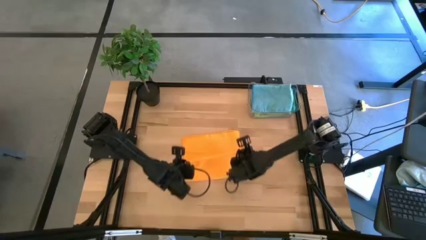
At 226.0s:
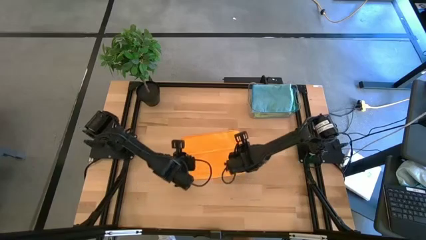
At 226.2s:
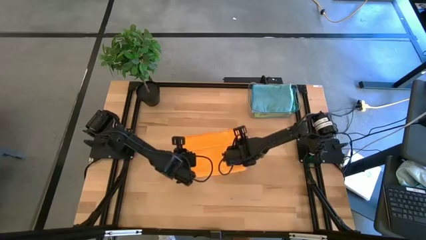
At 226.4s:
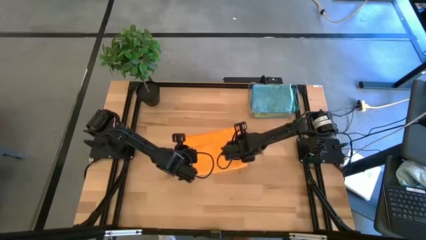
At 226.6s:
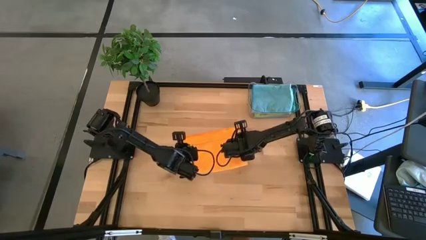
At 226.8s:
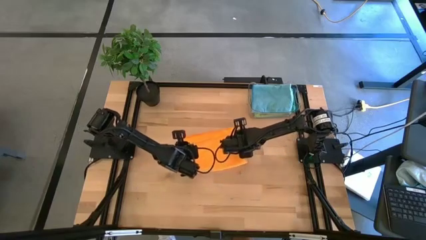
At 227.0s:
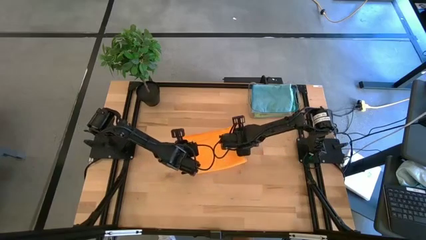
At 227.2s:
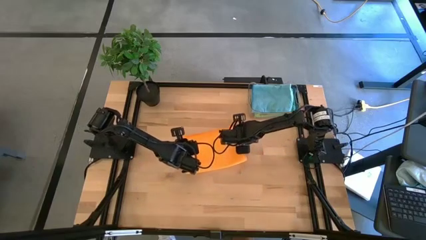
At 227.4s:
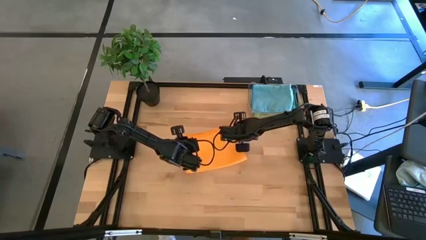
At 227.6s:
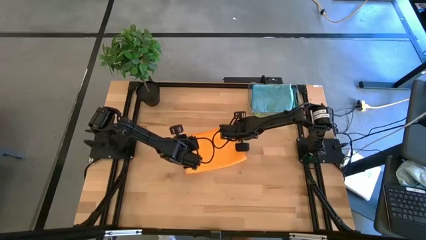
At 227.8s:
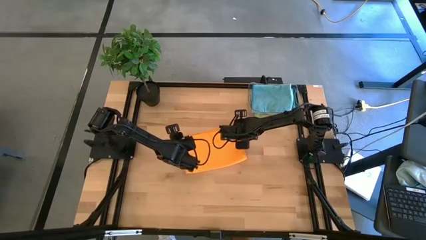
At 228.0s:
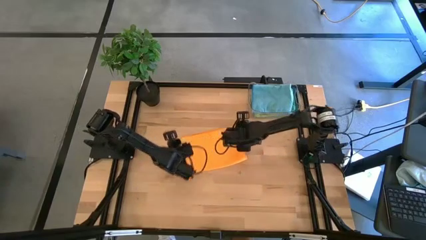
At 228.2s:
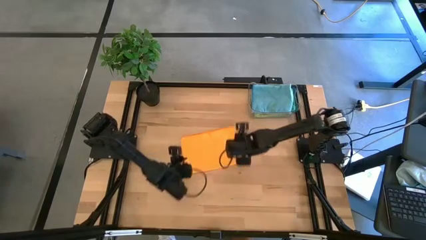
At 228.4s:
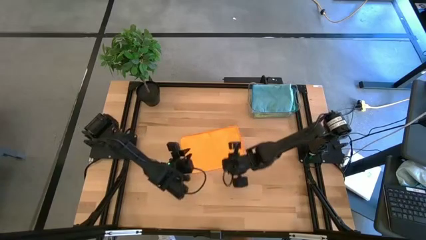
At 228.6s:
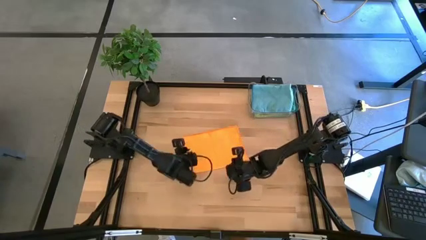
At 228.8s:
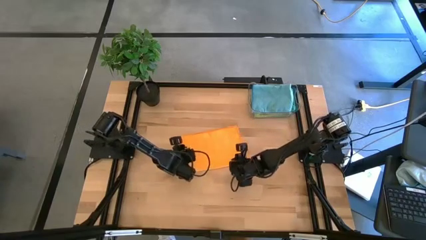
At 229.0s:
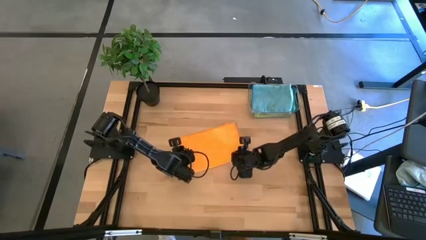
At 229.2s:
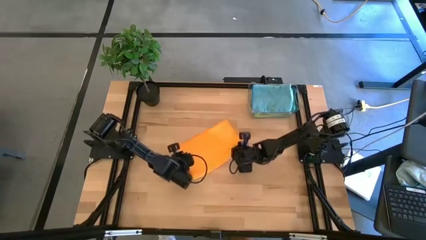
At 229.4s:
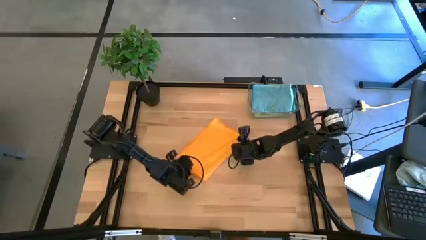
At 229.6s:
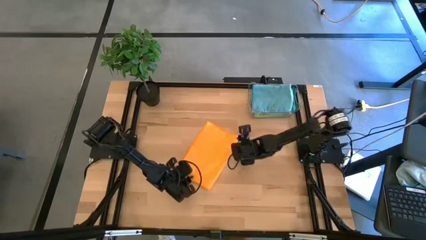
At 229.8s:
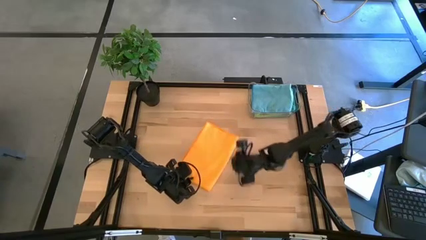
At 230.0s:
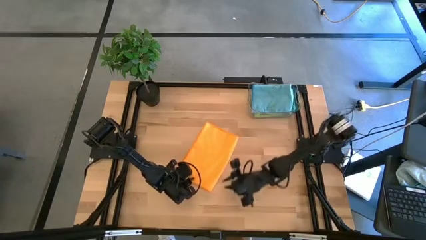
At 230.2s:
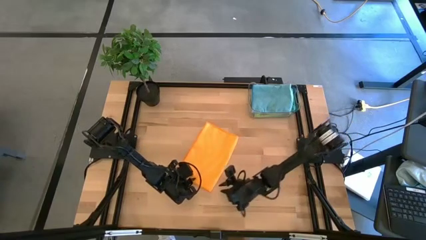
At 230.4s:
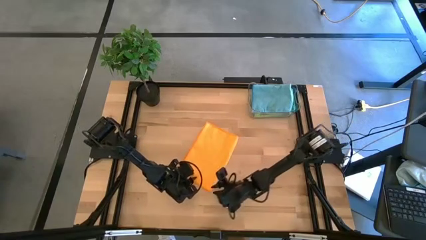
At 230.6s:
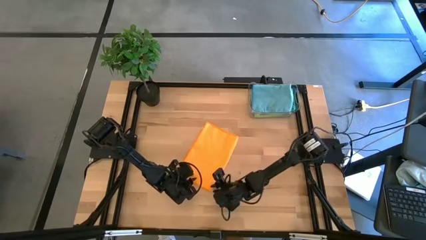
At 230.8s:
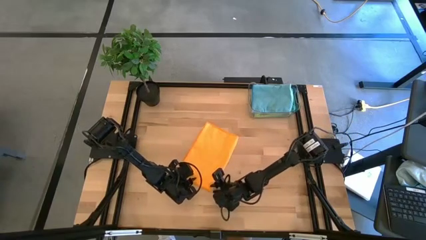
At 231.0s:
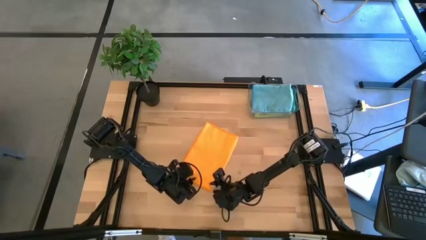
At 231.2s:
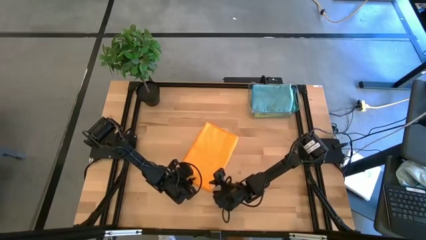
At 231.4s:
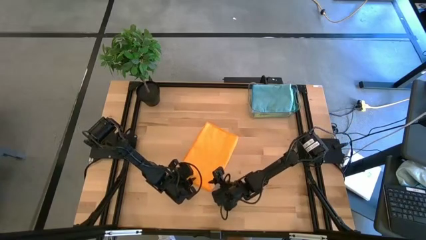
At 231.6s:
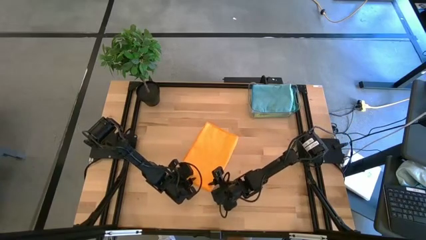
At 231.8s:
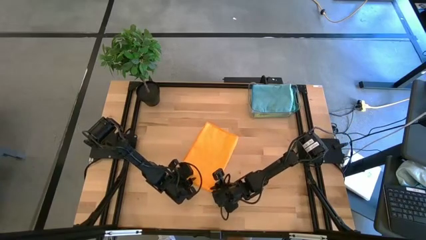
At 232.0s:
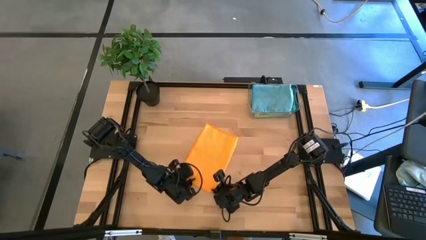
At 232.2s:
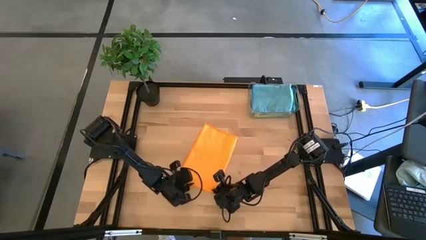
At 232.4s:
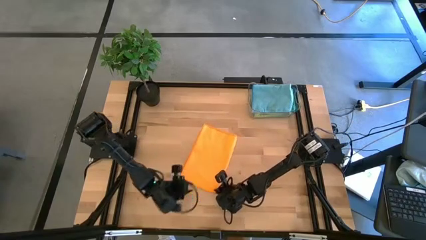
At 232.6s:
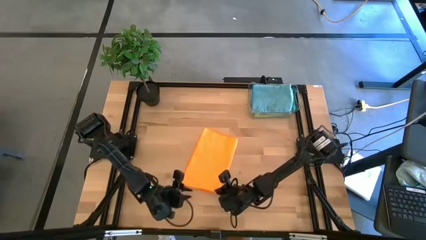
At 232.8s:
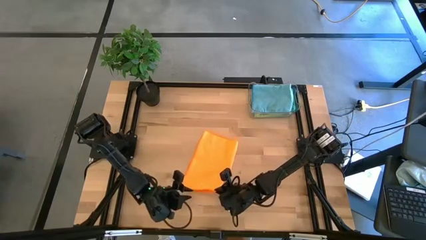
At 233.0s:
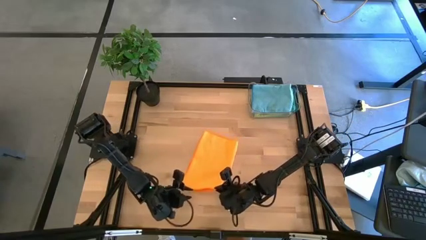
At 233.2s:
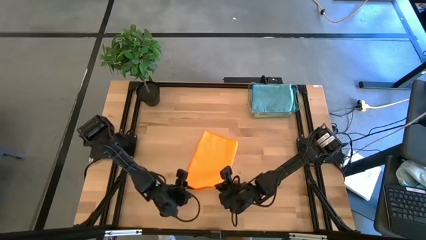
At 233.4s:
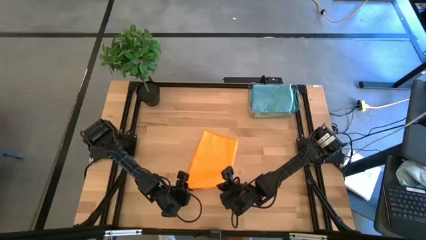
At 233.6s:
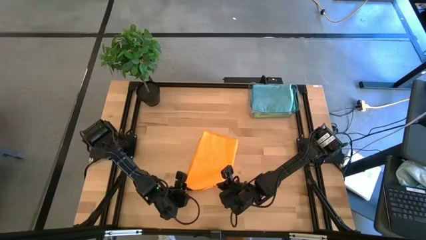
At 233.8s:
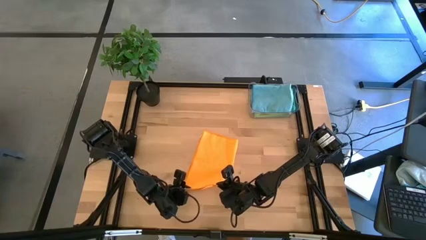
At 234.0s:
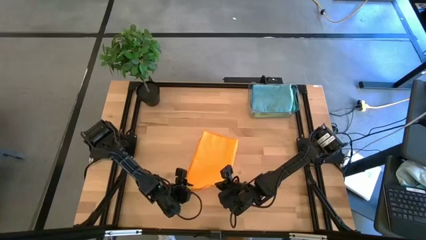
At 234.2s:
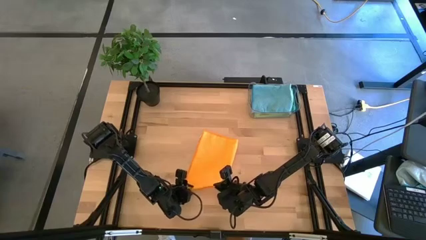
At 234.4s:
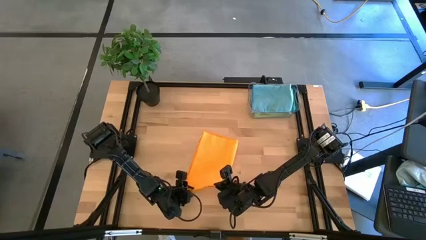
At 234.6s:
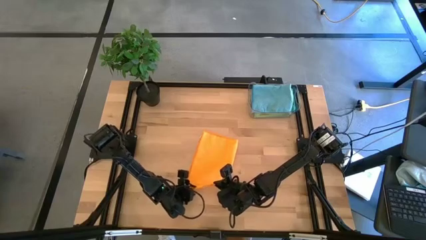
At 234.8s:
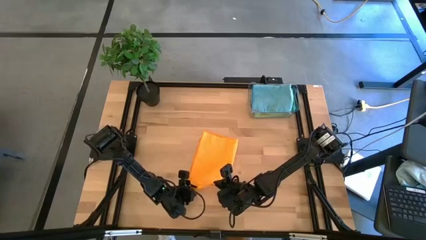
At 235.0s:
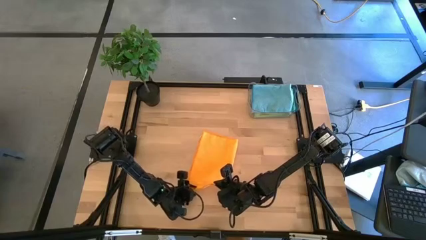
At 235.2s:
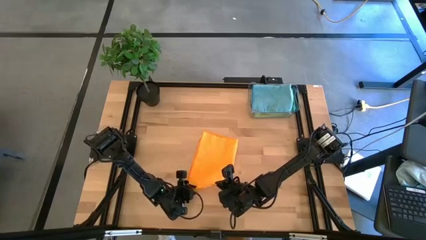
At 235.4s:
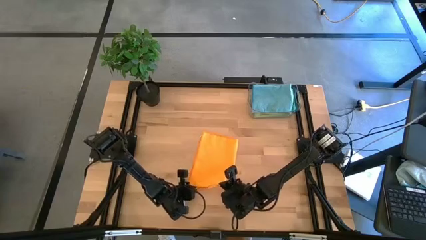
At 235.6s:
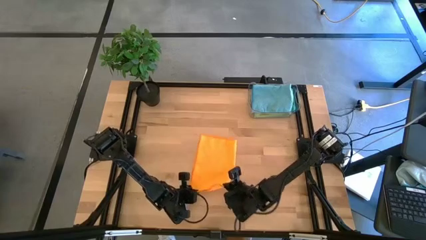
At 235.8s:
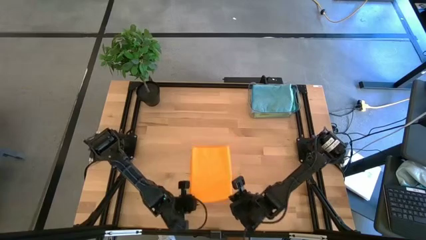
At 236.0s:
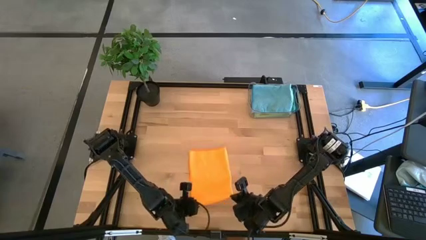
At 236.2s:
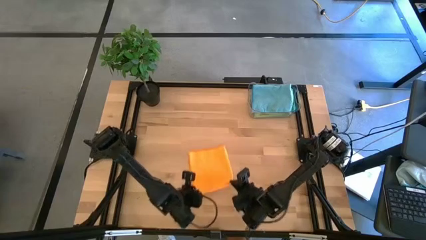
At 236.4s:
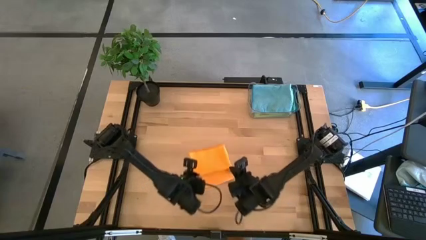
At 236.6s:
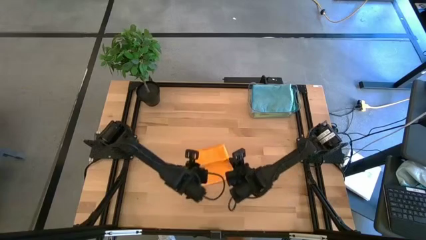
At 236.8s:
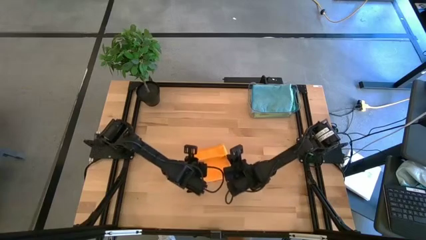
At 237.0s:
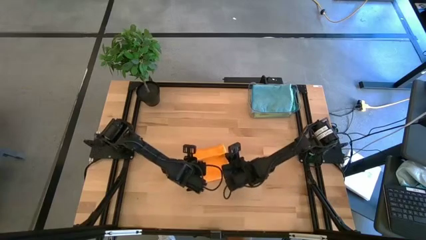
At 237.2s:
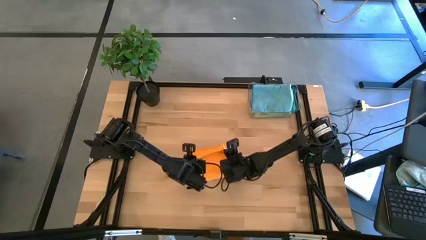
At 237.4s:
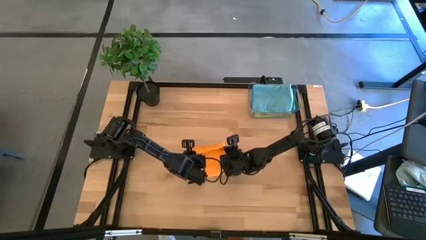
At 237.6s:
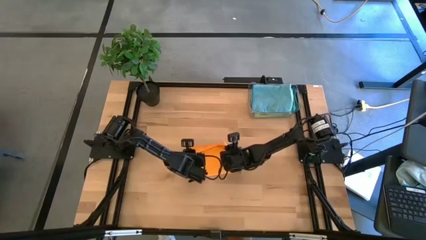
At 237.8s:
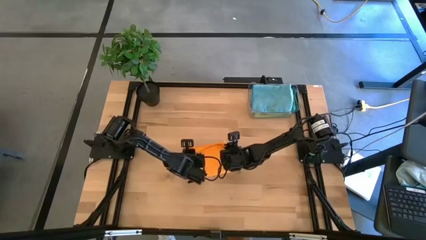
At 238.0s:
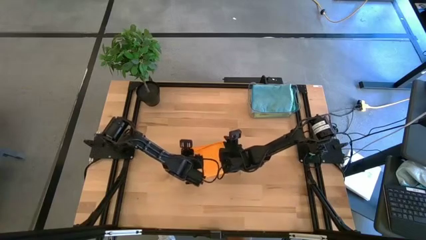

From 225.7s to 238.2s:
Task: Fold microfiber towels
Fold the orange microfiber towel

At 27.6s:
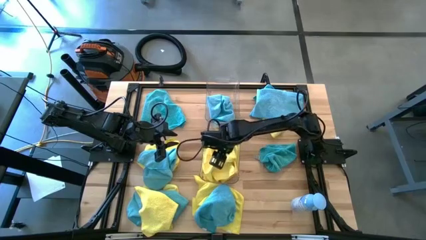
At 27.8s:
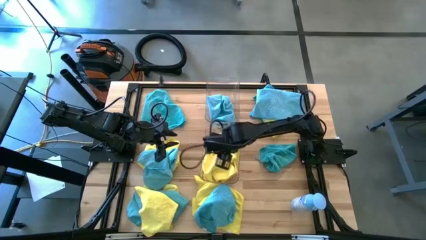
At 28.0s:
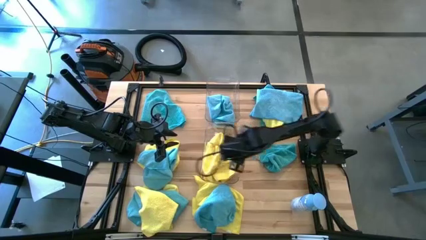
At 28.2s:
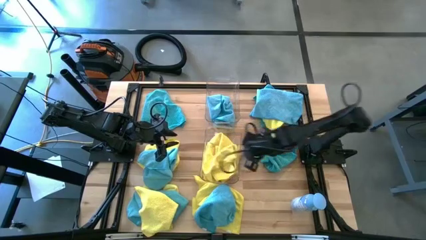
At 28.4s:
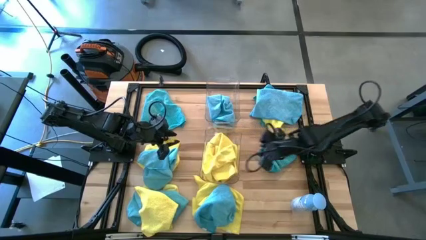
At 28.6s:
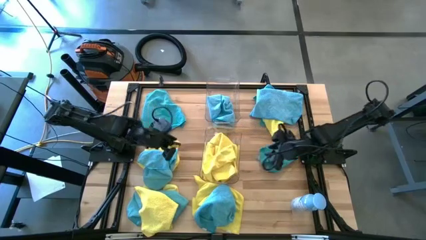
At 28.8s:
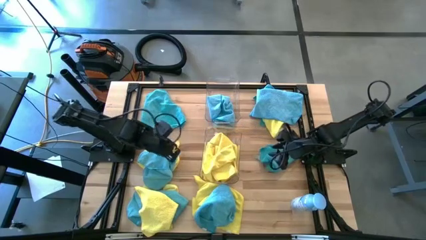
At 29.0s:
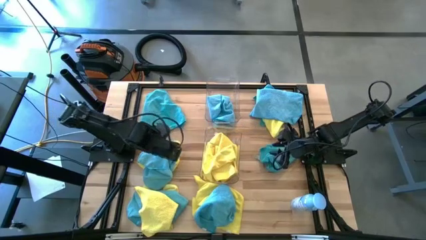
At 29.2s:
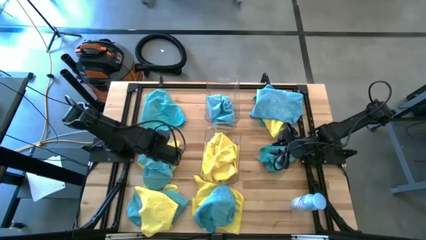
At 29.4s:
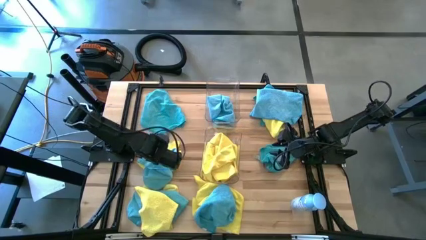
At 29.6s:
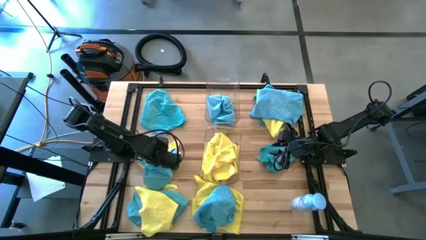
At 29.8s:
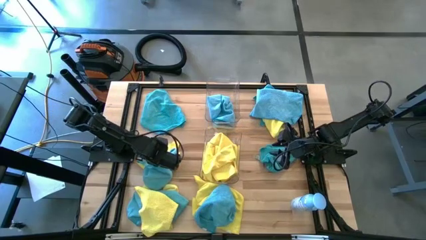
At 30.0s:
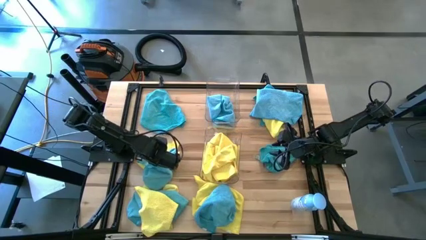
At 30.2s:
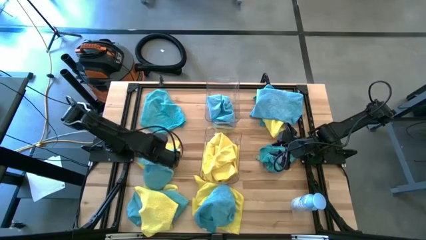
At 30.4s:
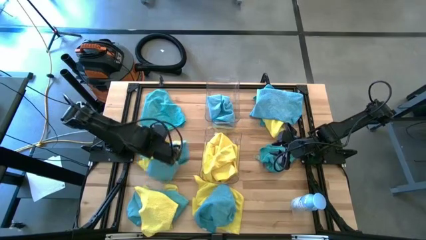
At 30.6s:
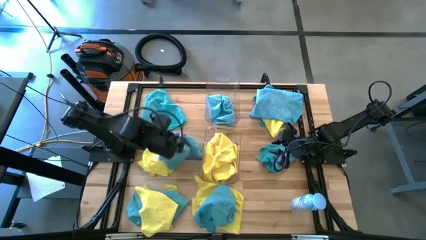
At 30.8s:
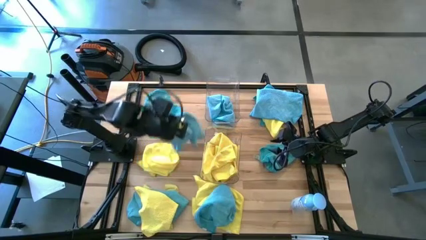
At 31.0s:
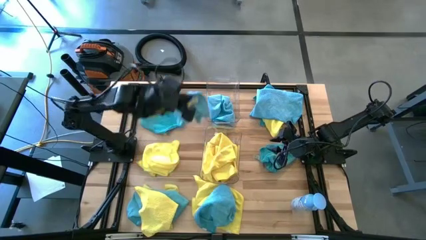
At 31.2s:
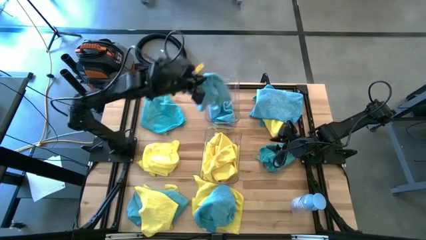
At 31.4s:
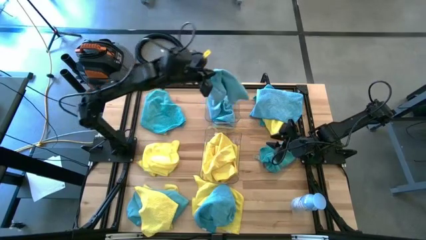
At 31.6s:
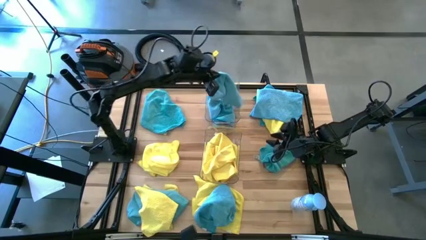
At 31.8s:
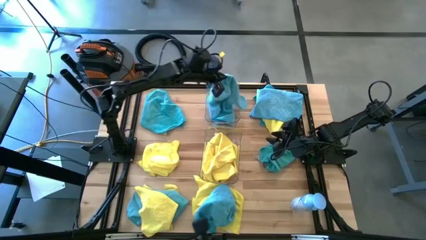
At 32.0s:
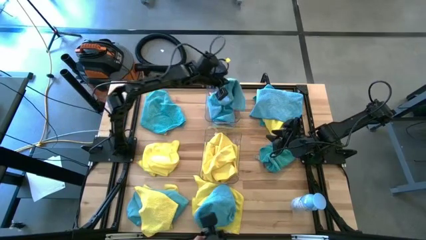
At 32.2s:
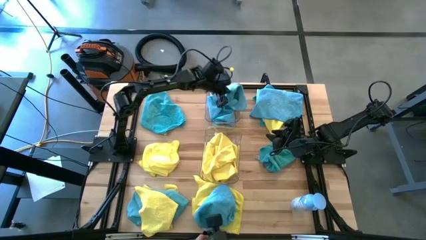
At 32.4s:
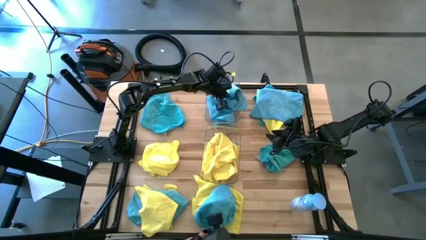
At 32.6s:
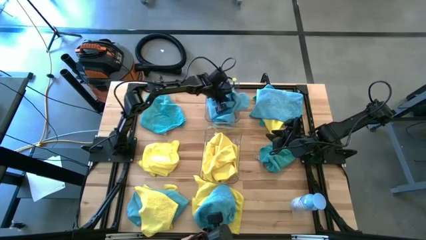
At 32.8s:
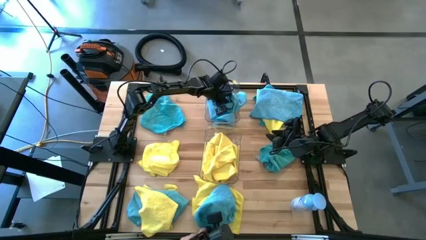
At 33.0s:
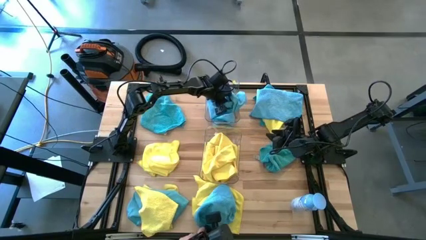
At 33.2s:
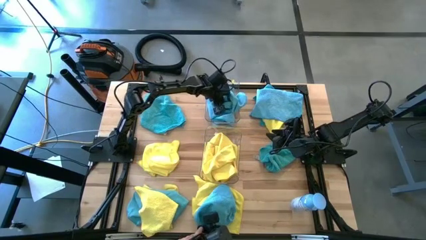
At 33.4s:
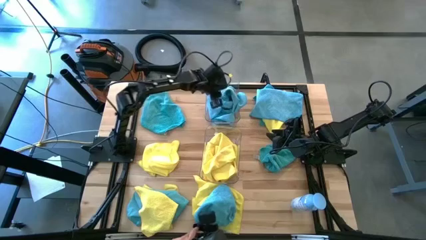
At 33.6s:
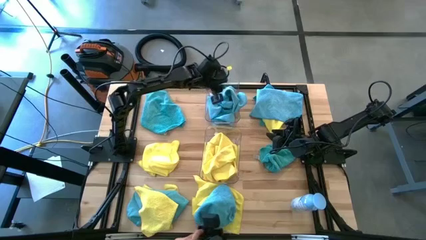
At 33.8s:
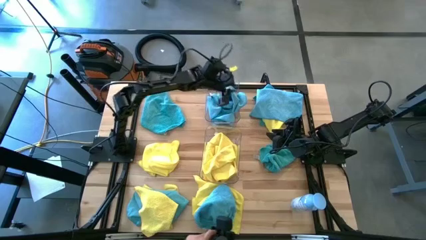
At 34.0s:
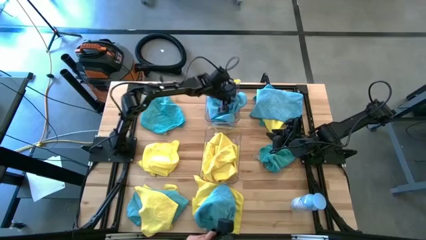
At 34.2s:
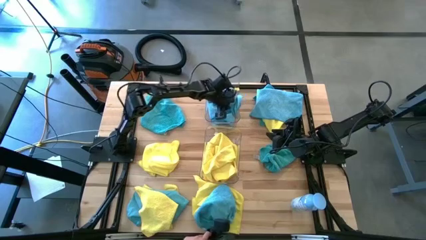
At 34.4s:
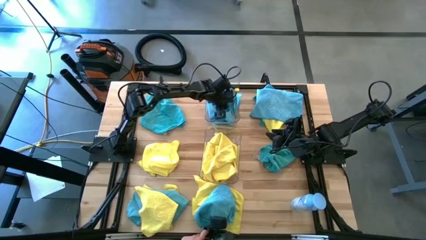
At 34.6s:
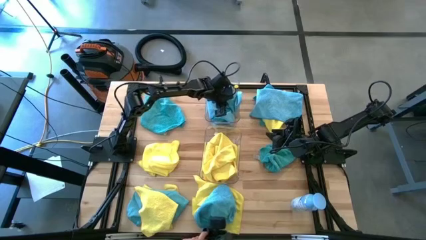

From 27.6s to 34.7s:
Task: Sort microfiber towel by color & place in baskets
Put the blue towel into the top transparent bin
